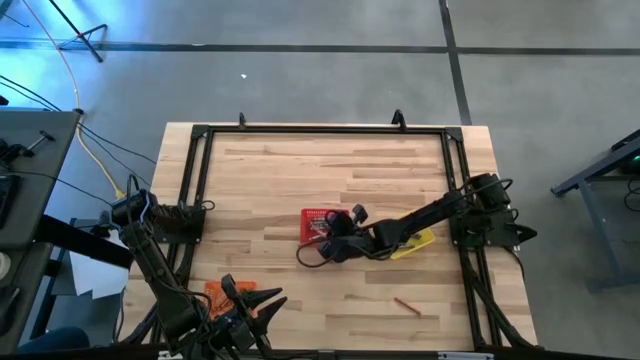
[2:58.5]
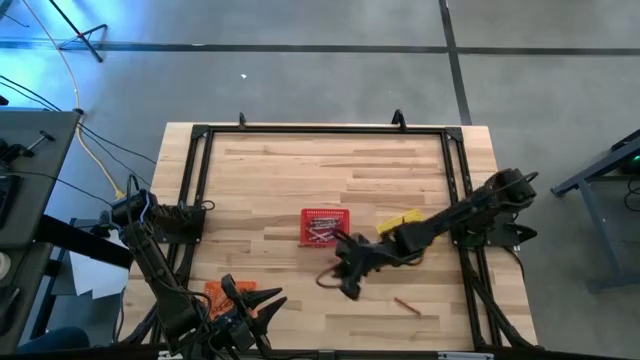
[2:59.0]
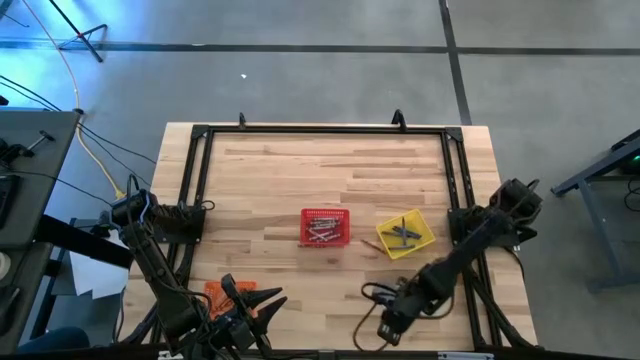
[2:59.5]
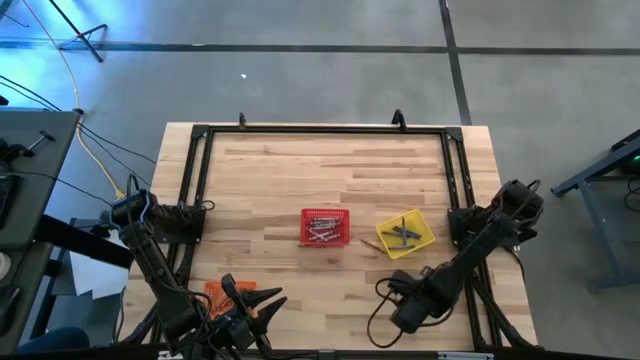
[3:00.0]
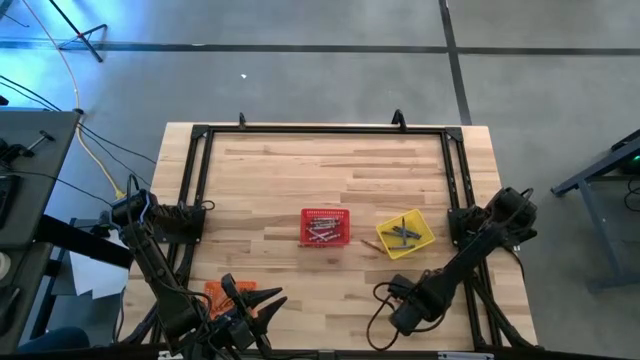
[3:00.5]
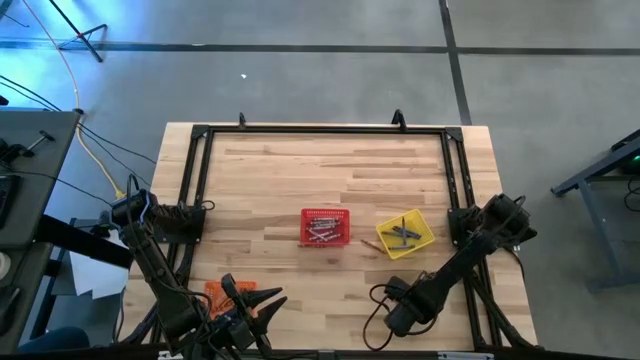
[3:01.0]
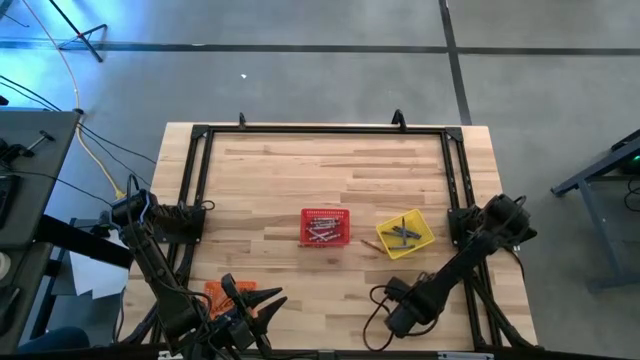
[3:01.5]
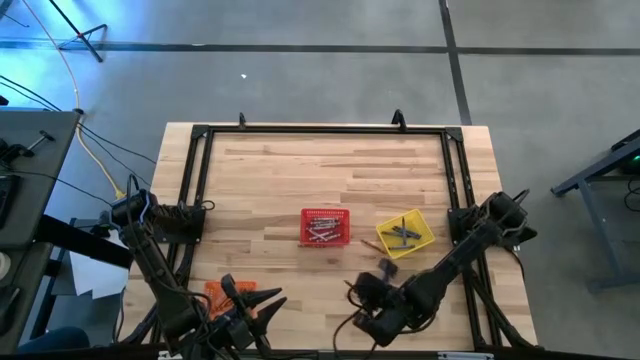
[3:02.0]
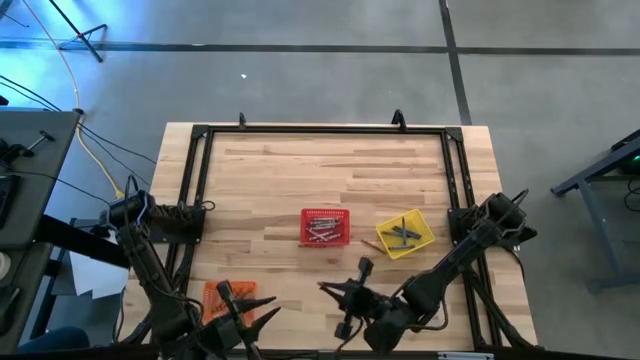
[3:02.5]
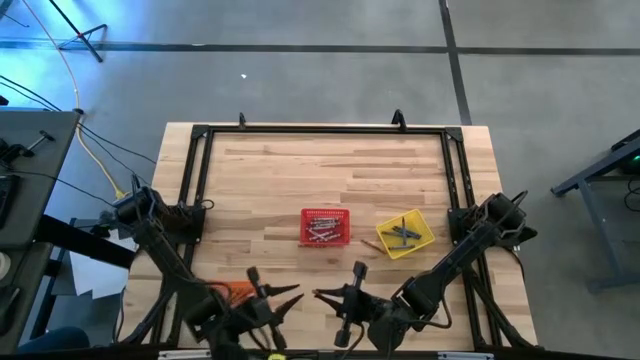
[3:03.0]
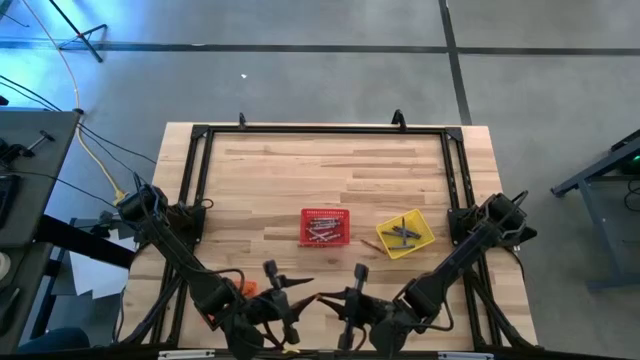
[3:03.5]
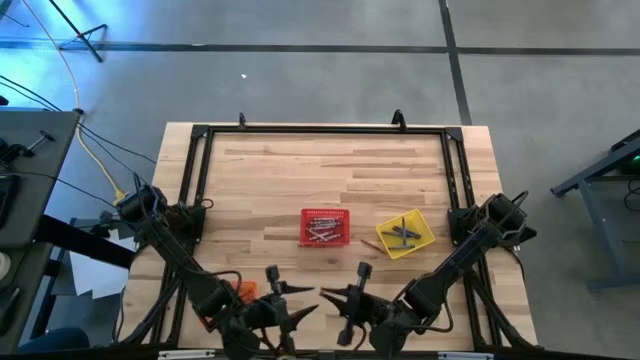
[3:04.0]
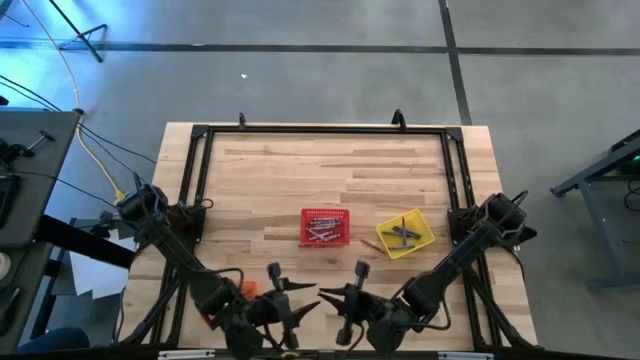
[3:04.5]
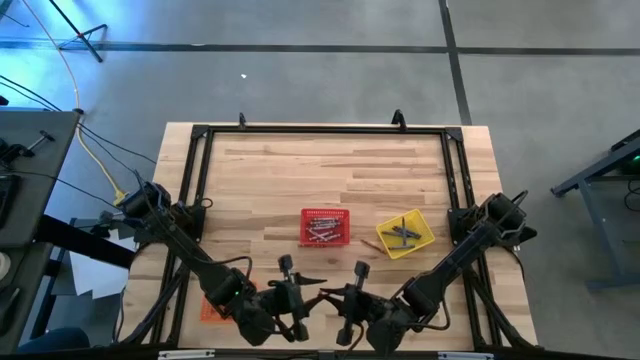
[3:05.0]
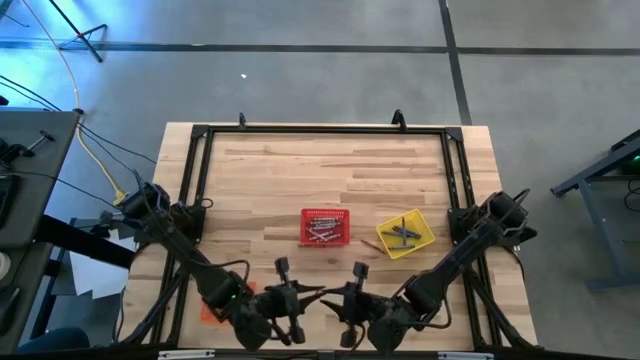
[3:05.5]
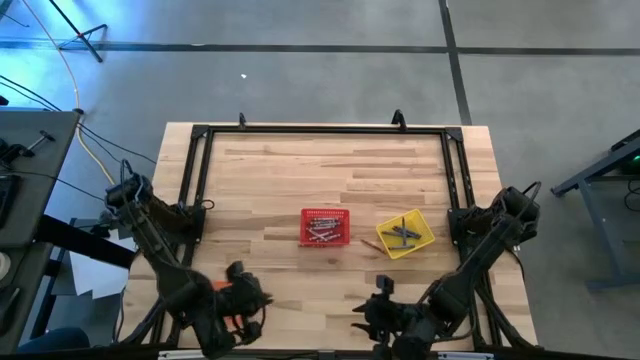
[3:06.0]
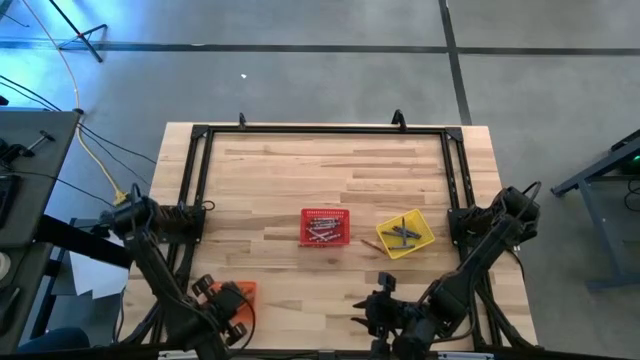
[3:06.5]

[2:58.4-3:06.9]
Task: Sort crayons
Put the orange crayon into the orange bin

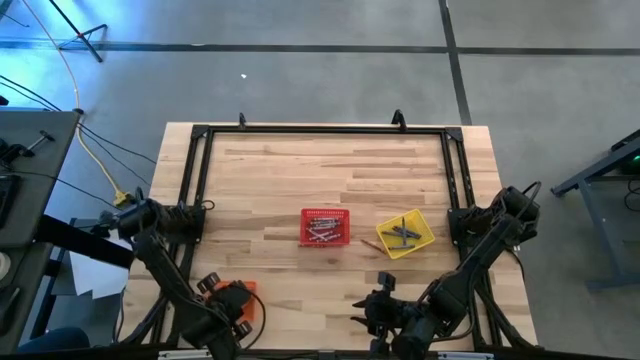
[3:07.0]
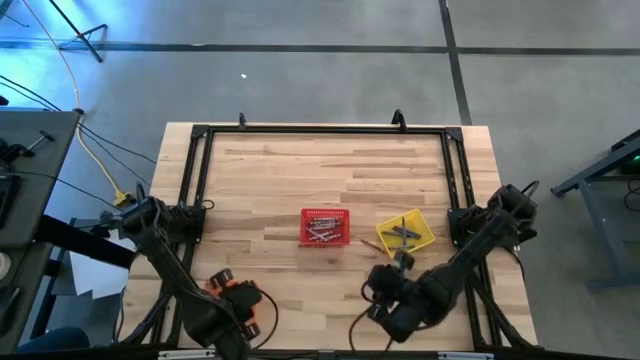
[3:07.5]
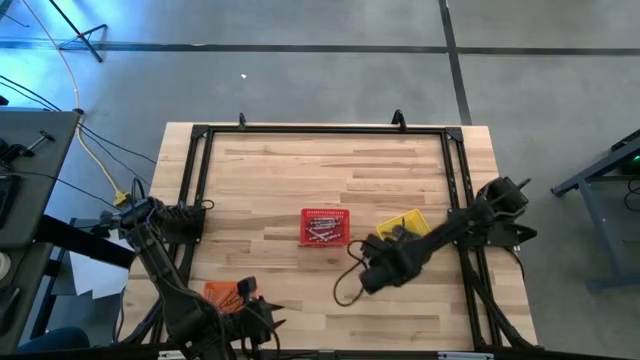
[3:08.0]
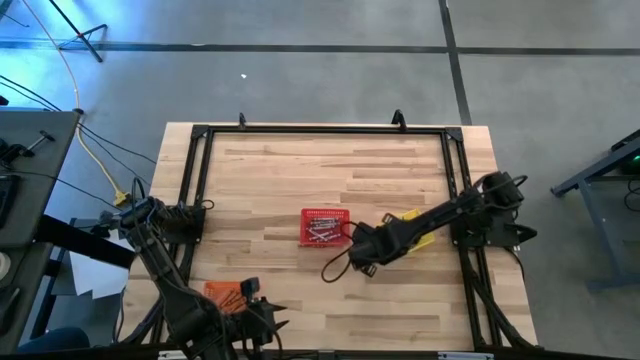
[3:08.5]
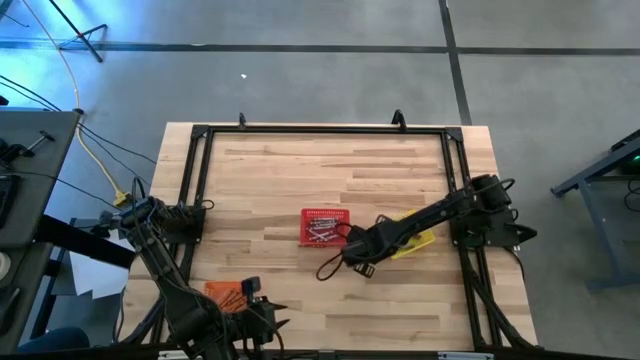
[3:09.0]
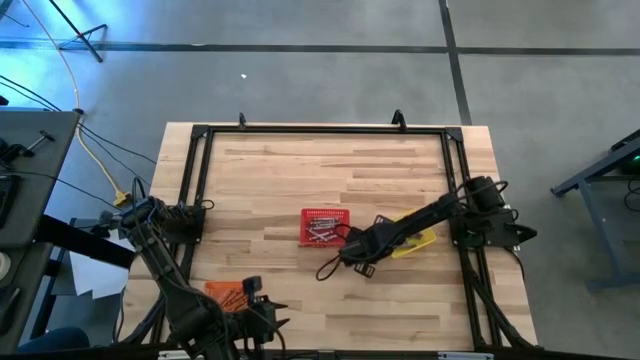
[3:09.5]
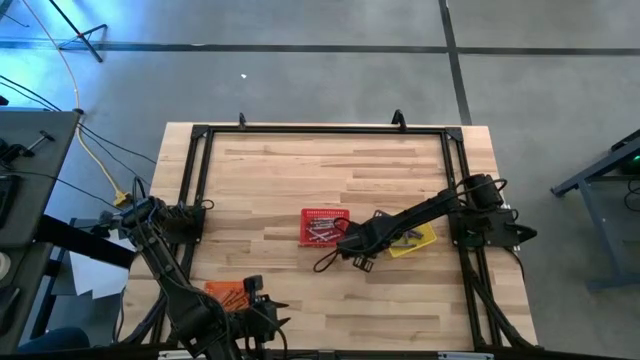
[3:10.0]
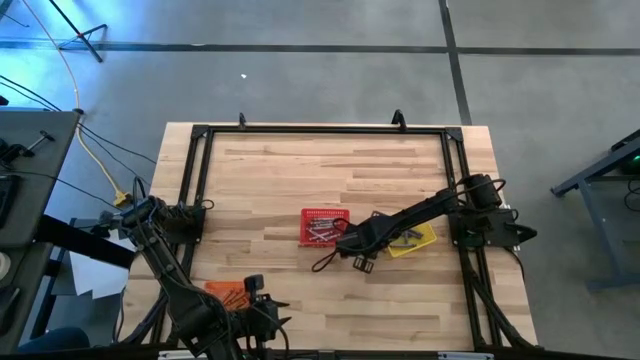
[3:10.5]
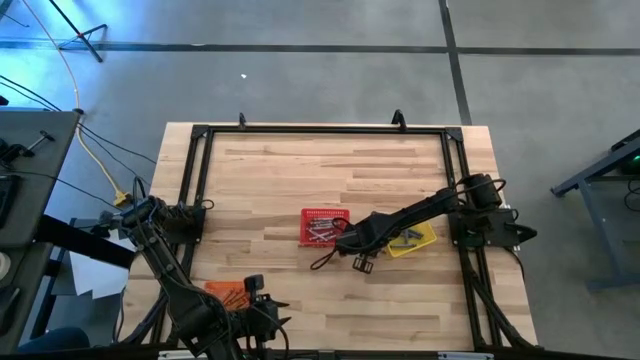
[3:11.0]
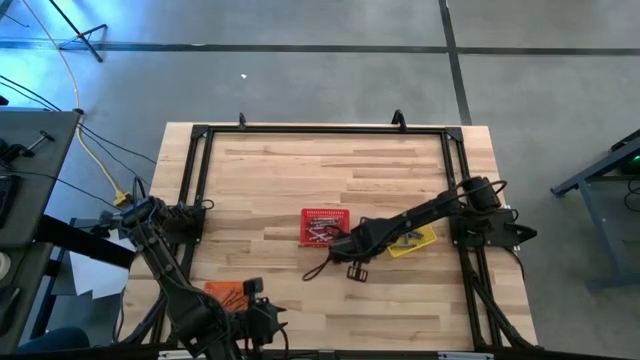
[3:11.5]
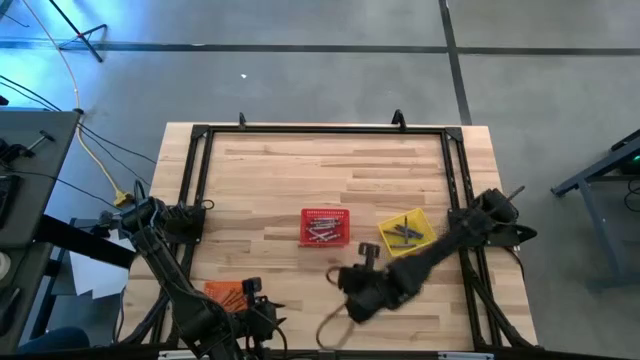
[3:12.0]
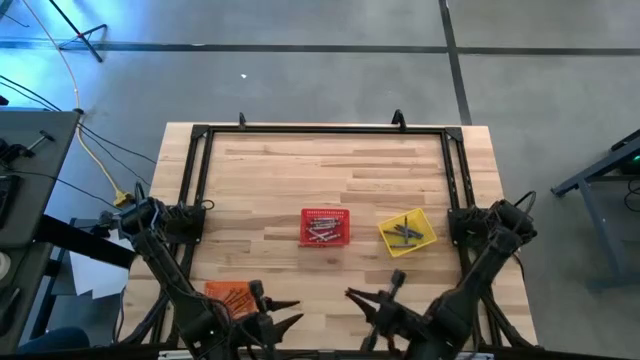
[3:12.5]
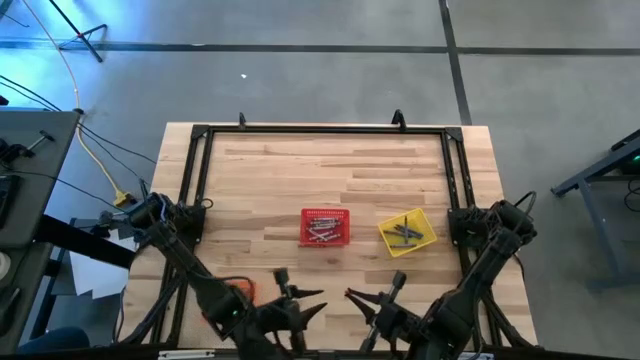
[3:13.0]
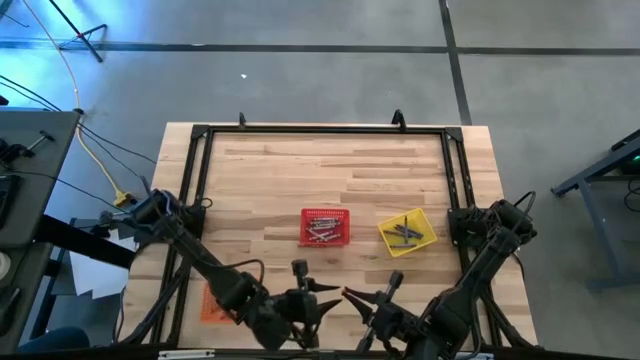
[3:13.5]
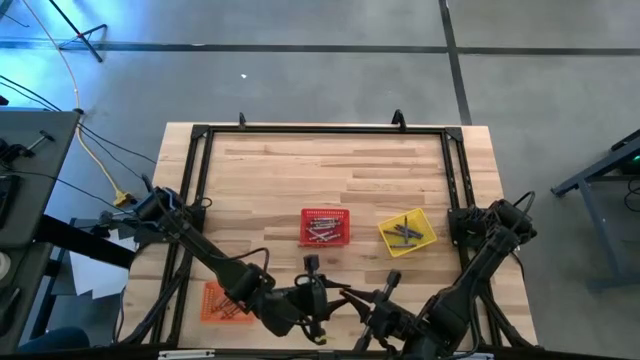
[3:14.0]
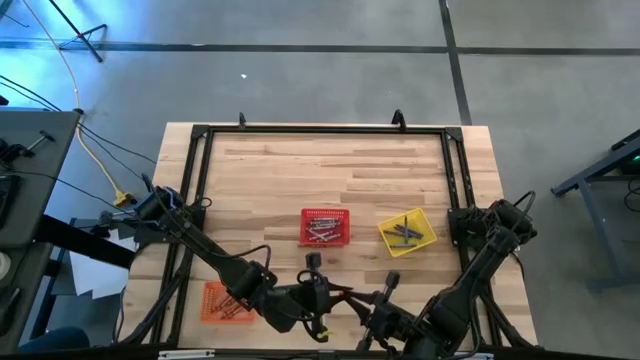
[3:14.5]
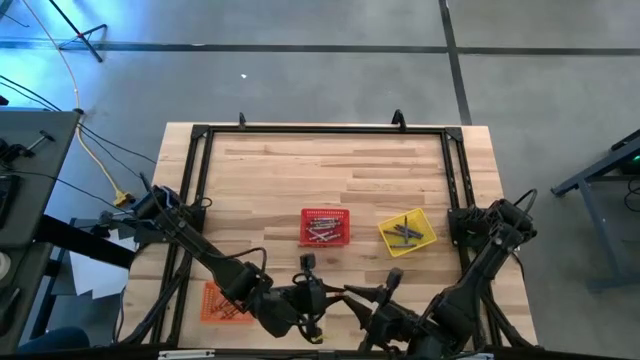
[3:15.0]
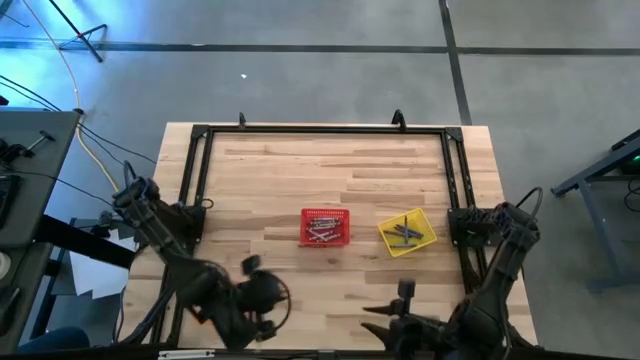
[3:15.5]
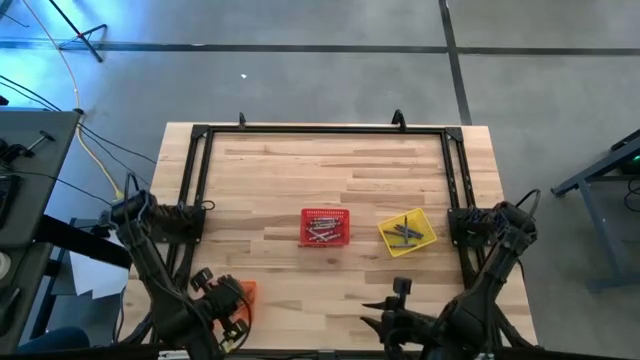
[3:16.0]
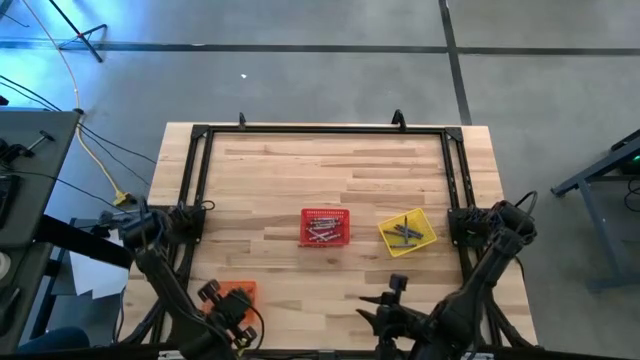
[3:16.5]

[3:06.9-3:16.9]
Put the orange crayon into the orange bin

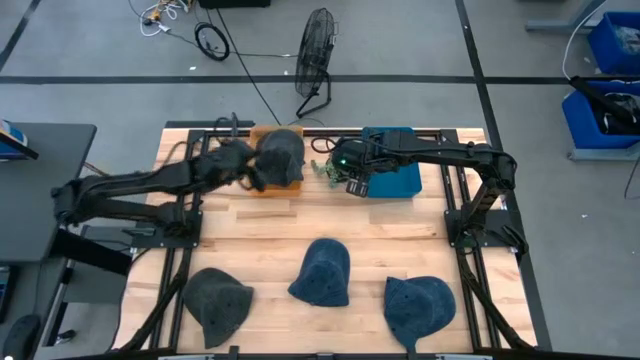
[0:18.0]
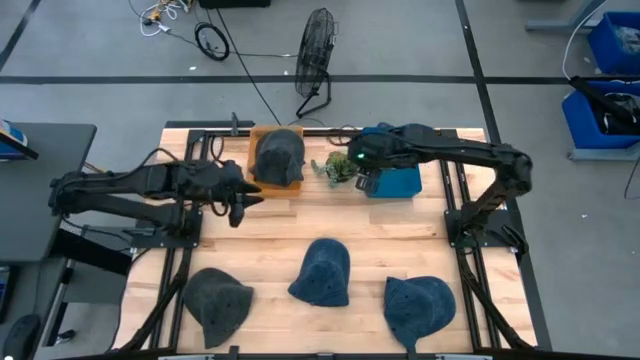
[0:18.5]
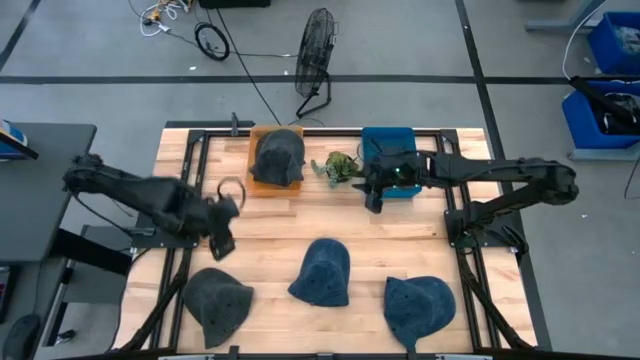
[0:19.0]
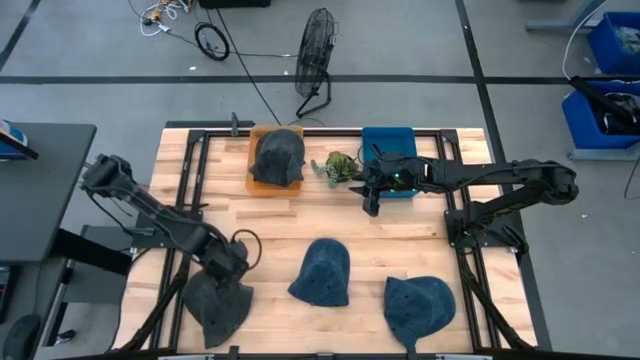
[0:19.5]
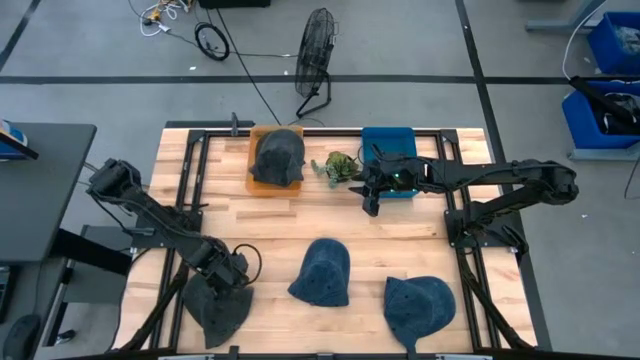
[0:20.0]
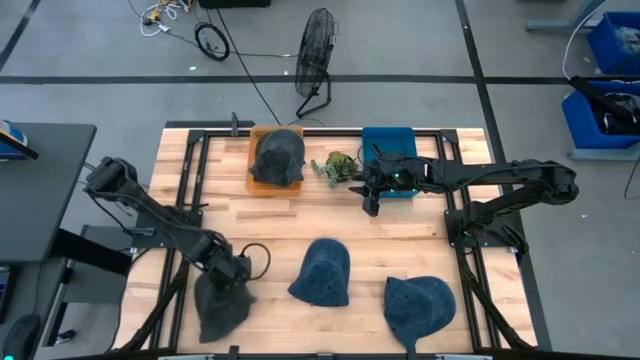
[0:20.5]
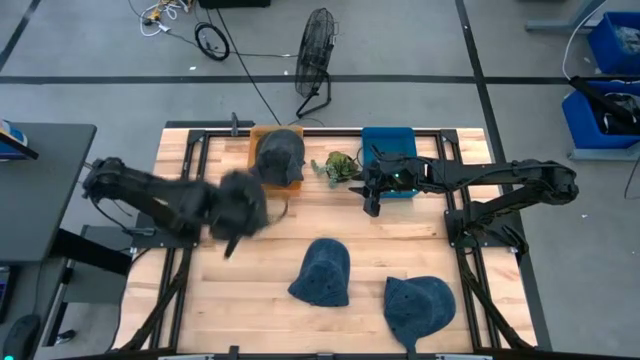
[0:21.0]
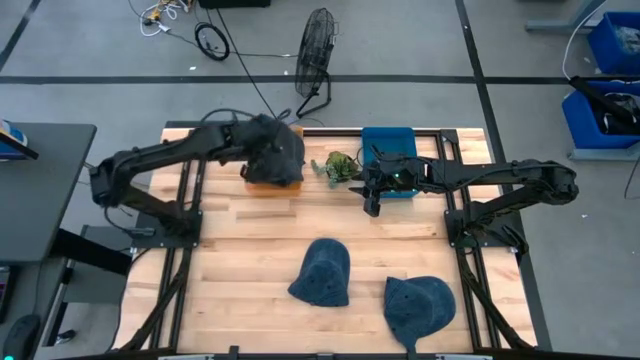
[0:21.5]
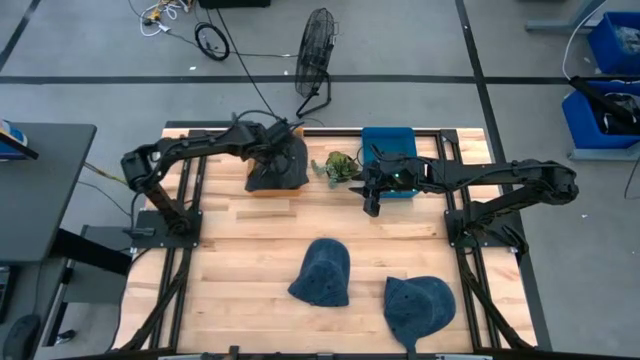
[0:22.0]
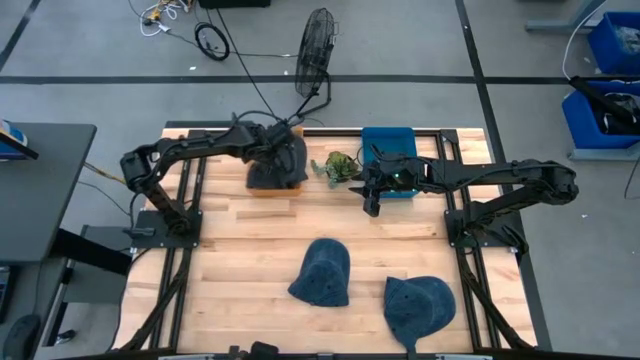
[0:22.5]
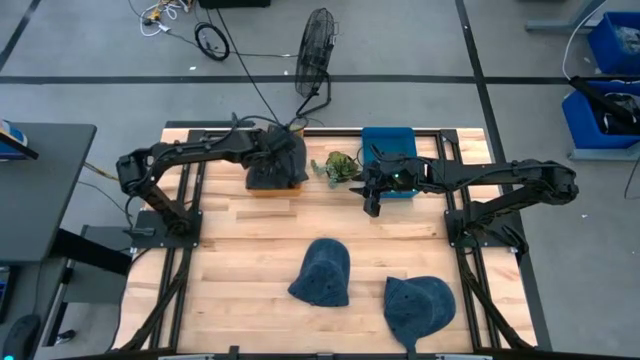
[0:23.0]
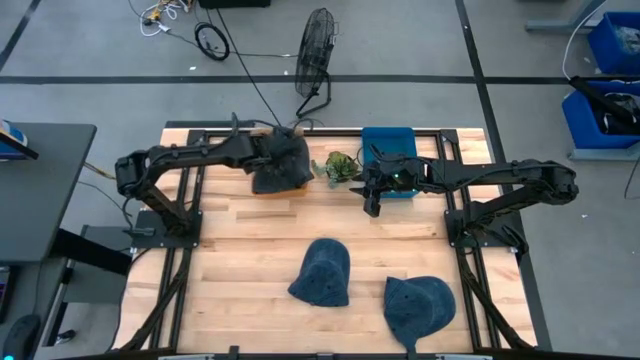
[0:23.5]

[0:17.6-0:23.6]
Task: Pick & Place hat
Put the black cap into the orange bin
